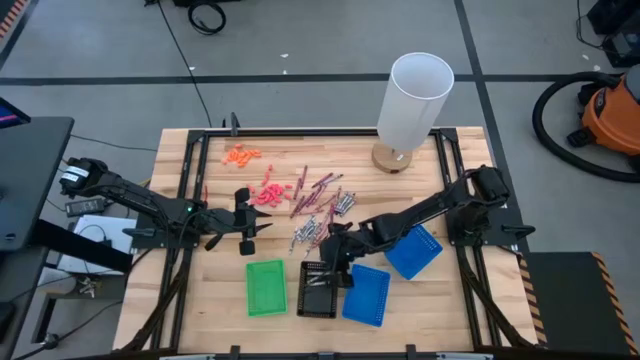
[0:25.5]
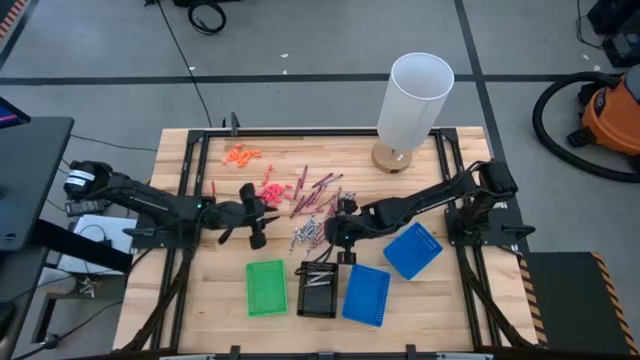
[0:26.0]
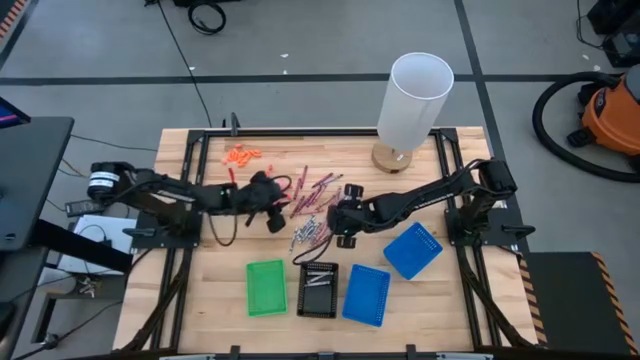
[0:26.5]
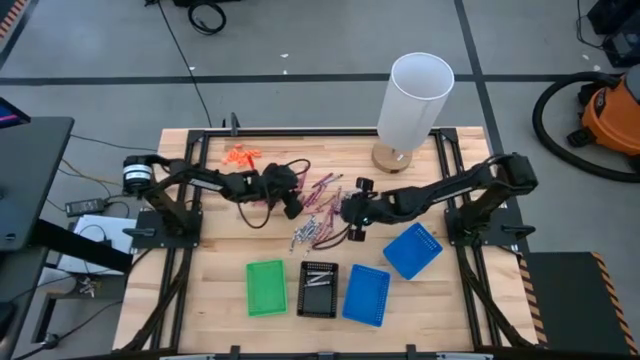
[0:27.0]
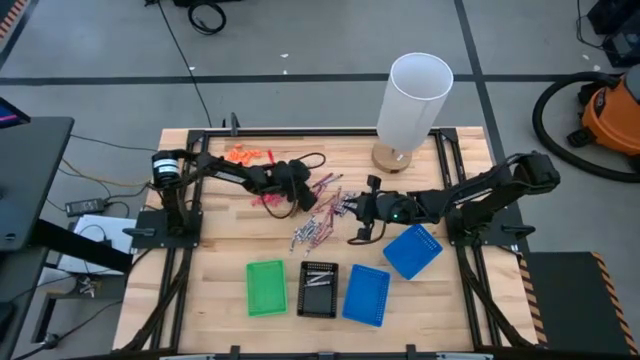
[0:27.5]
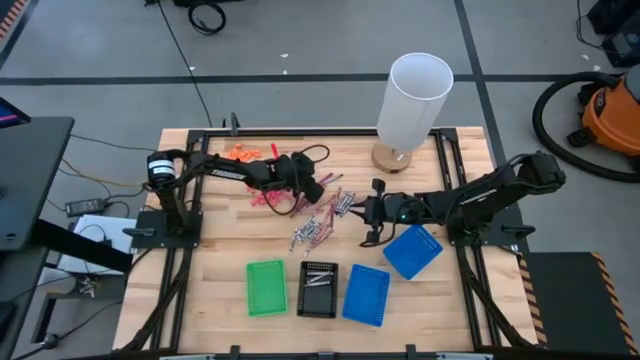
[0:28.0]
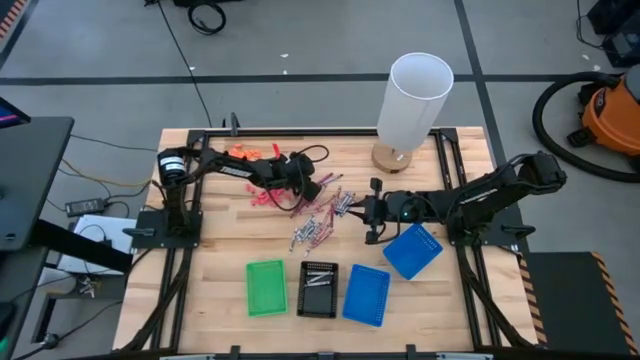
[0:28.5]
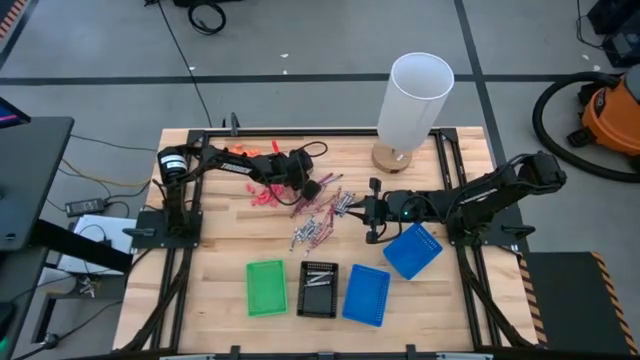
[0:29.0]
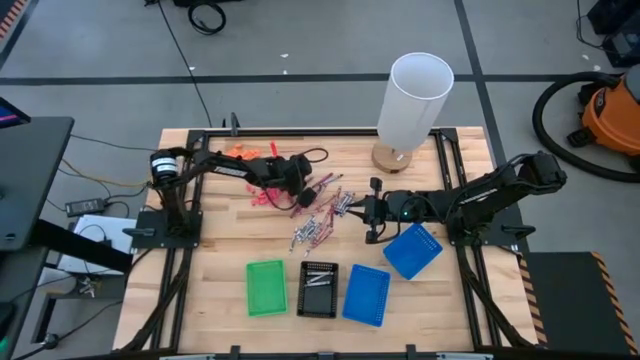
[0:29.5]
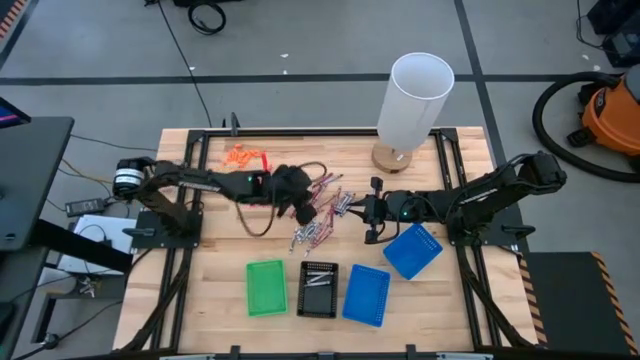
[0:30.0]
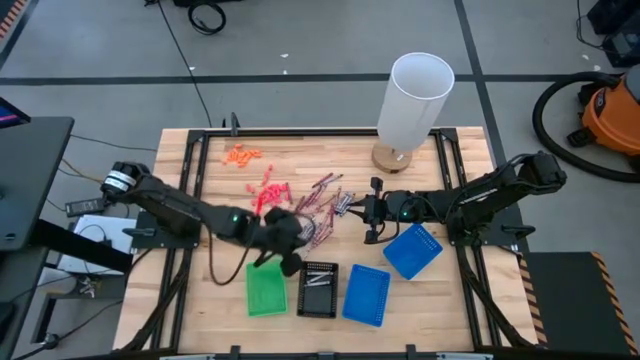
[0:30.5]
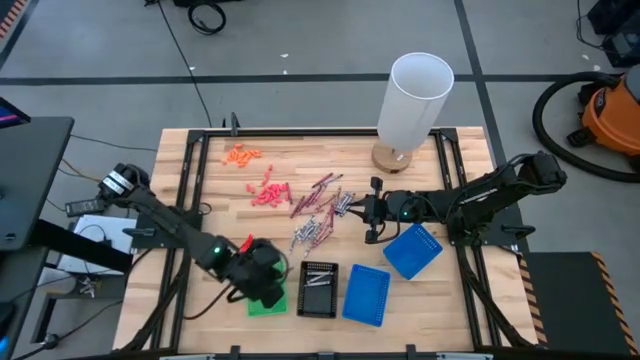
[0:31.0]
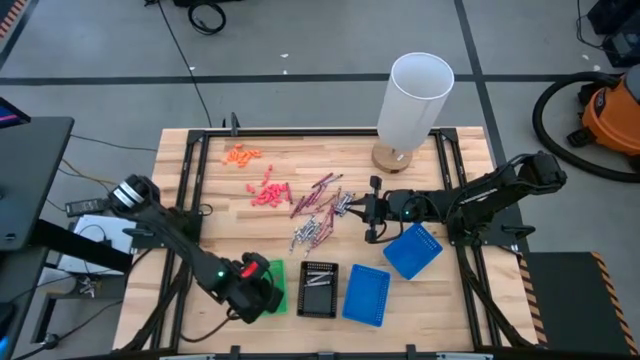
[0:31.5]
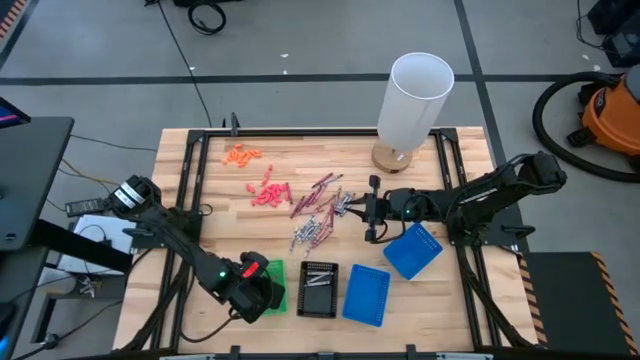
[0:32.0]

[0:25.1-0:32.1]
Task: Sort crayons
Put the red crayon into the green basket

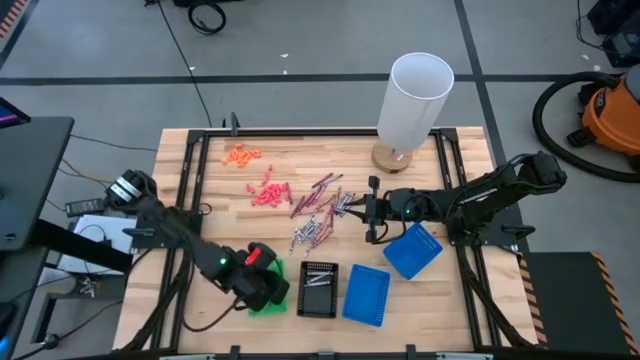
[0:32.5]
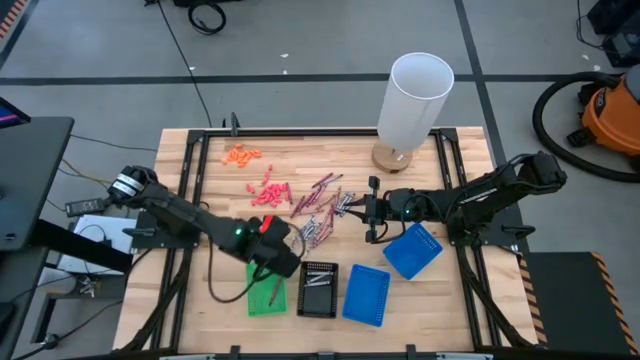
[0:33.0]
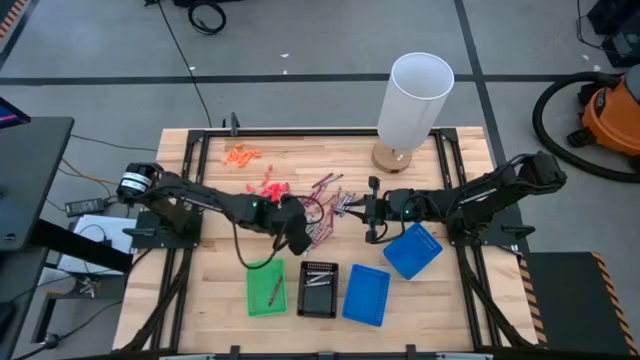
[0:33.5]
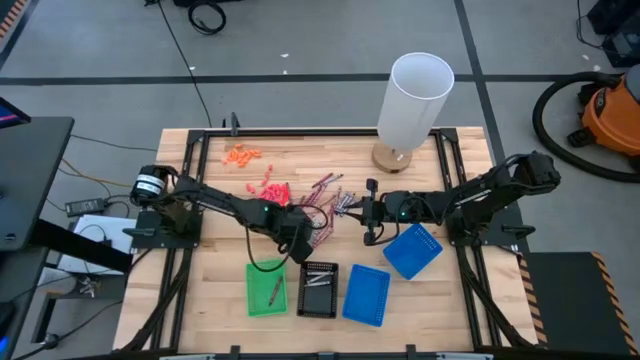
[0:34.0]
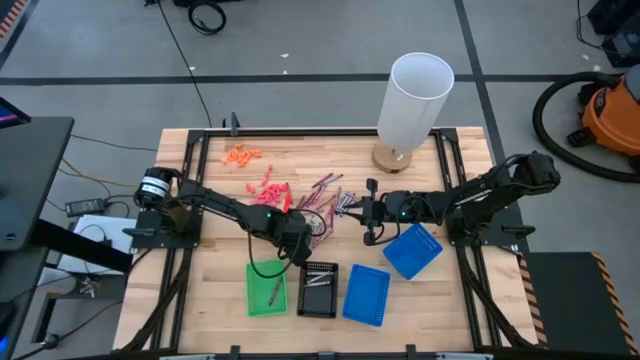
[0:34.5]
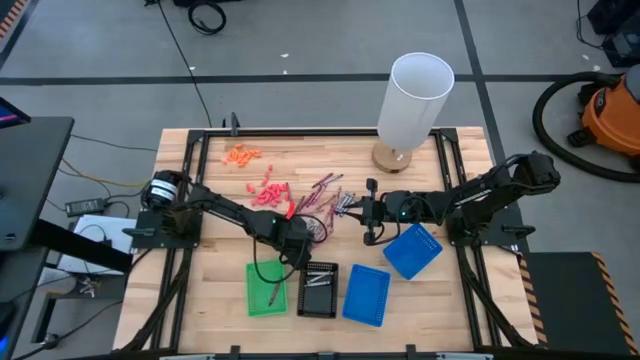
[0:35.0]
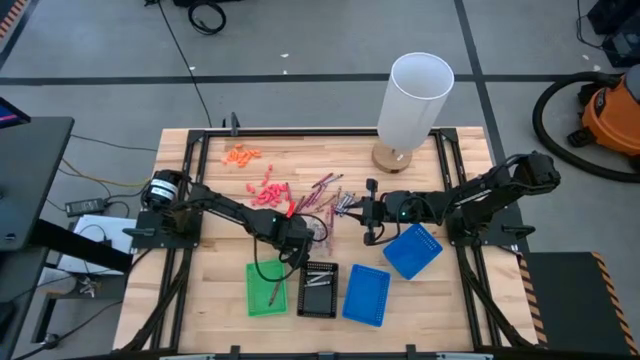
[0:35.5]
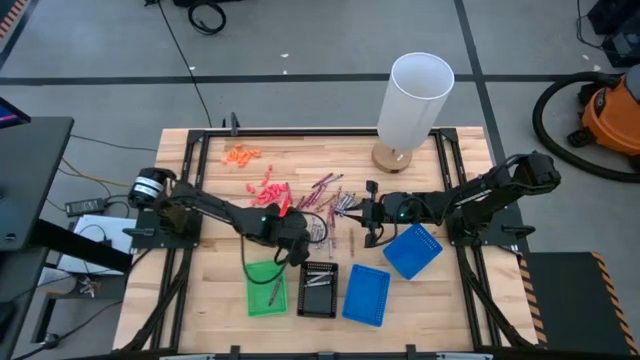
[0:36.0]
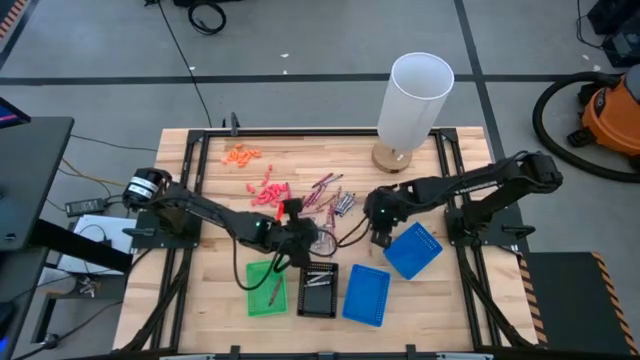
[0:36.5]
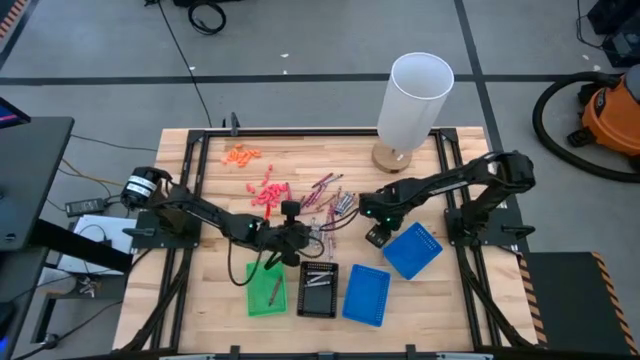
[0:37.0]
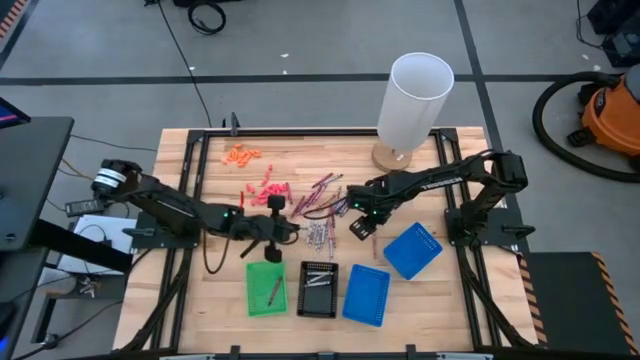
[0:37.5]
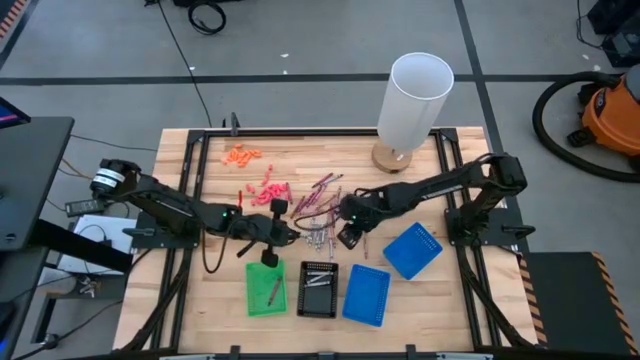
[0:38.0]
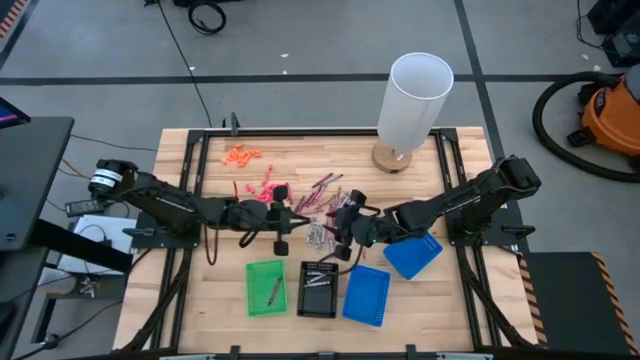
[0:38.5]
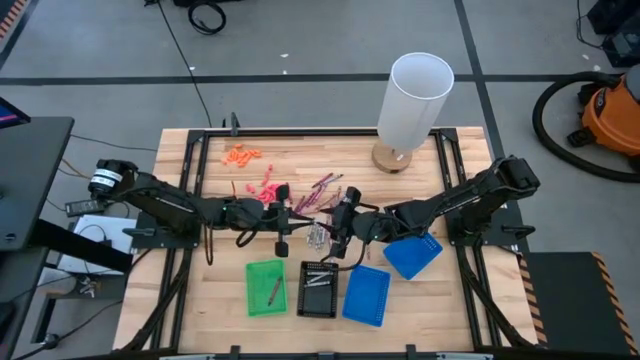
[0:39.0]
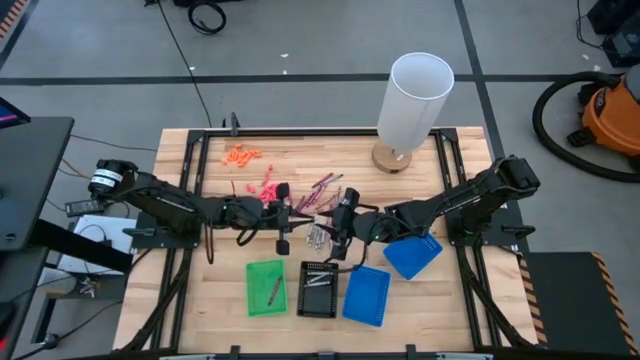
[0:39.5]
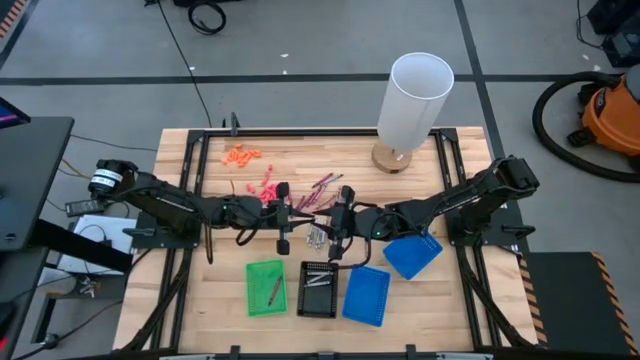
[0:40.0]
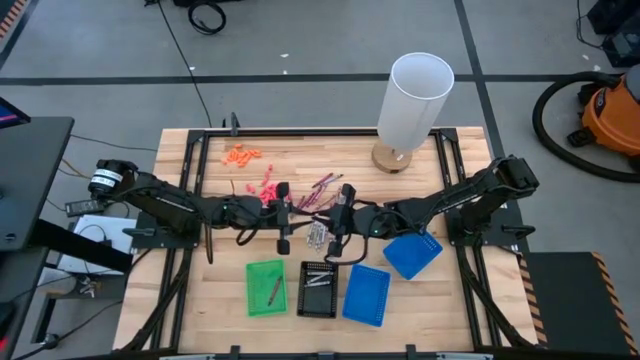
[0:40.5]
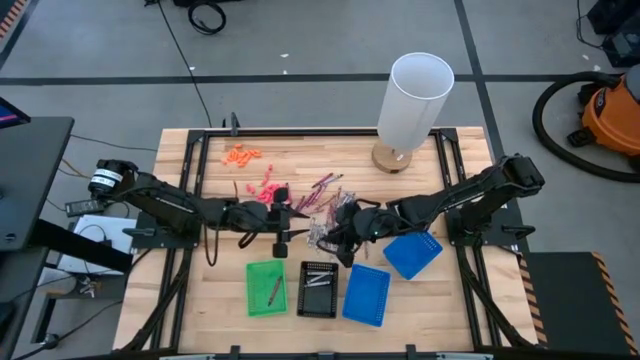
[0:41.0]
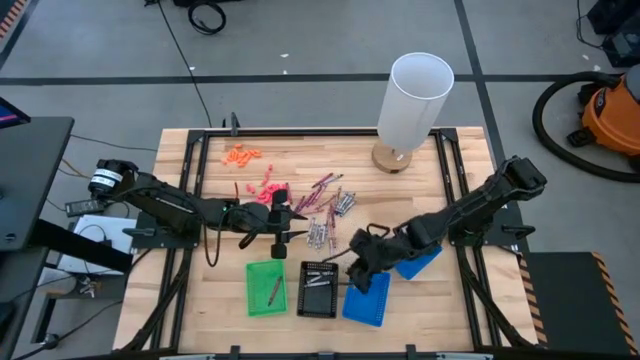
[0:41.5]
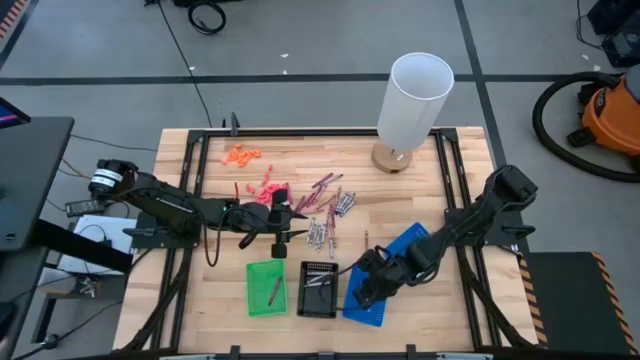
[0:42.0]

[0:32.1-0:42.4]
Put the white crayon into the left blue basket

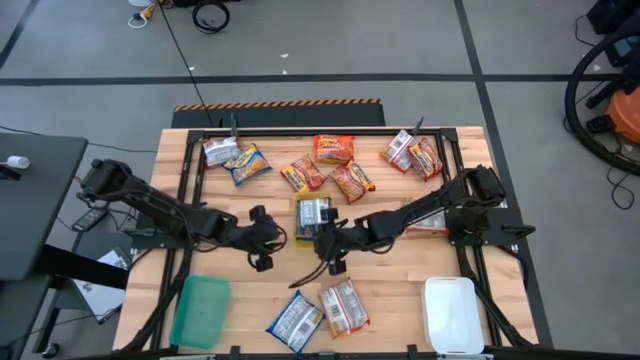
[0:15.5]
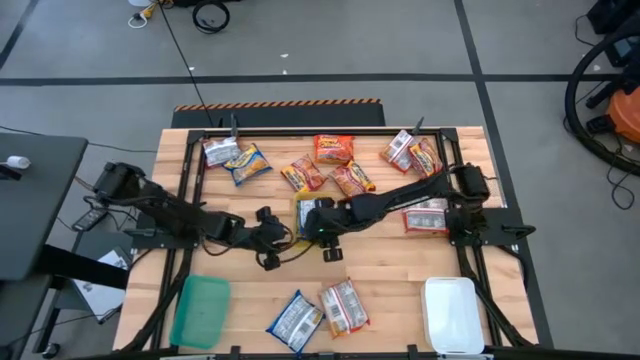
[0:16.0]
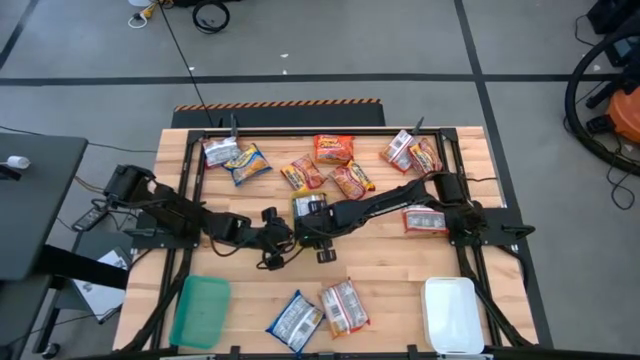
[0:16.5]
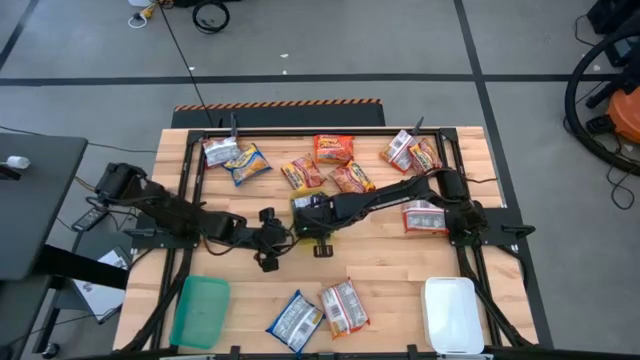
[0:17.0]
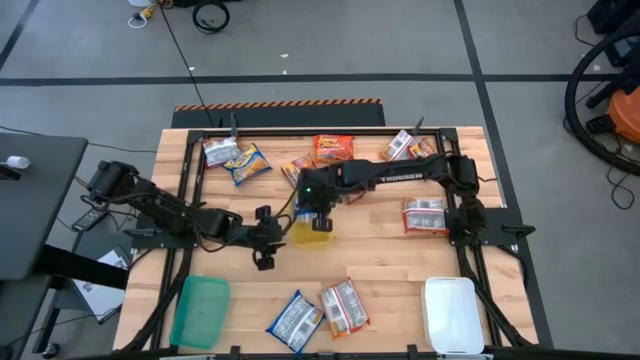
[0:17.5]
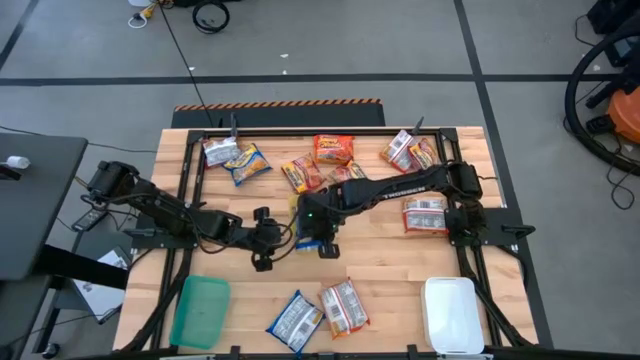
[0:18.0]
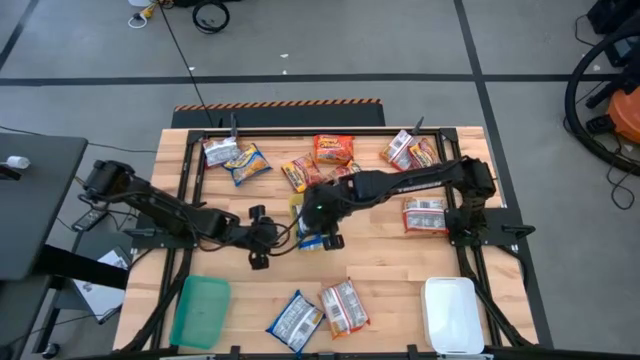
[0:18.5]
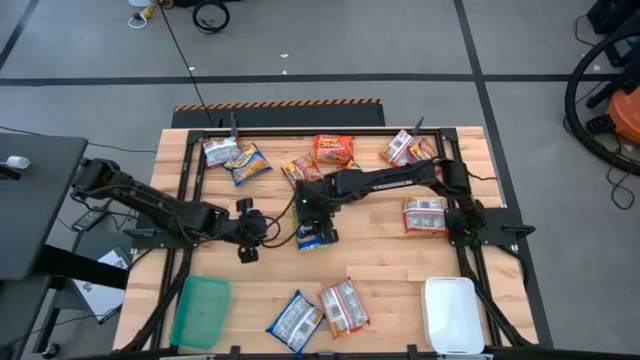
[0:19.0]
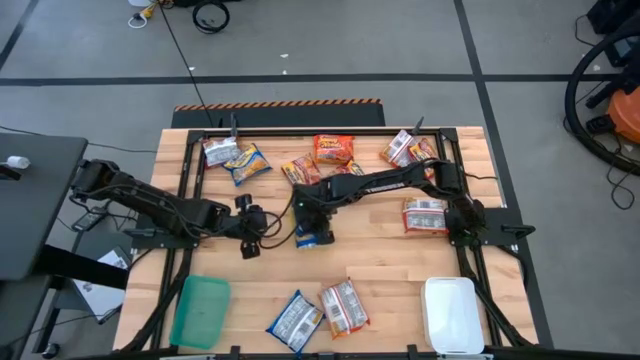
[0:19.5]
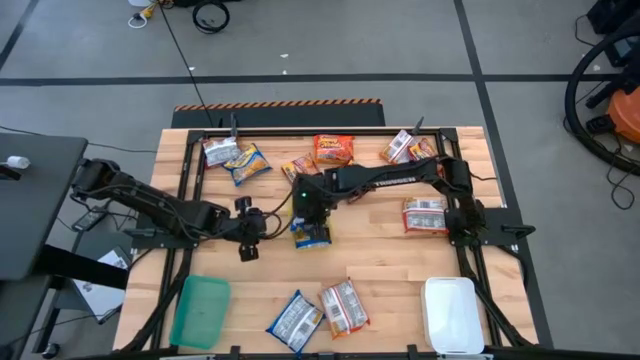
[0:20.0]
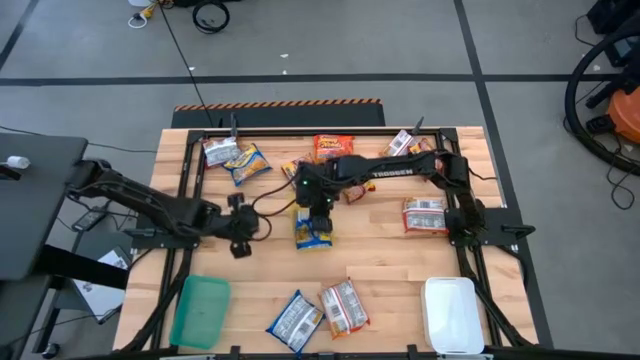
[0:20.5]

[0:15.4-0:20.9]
Task: Sort Maruchan noodles
Adjust the blue noodle packs in the yellow bin
